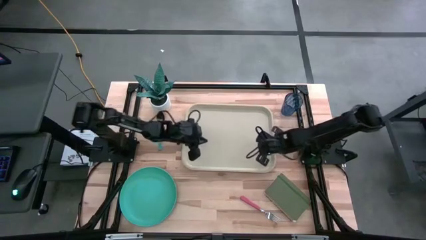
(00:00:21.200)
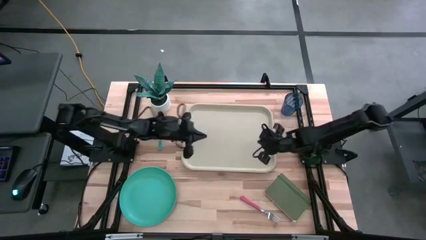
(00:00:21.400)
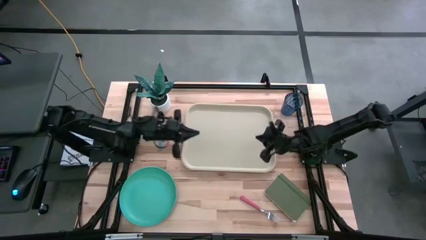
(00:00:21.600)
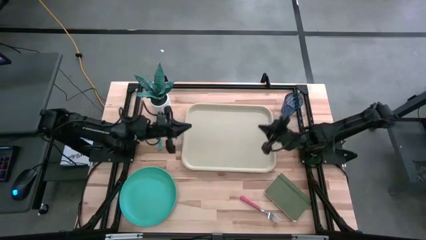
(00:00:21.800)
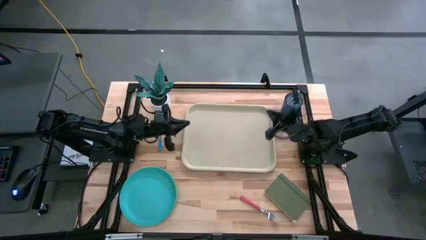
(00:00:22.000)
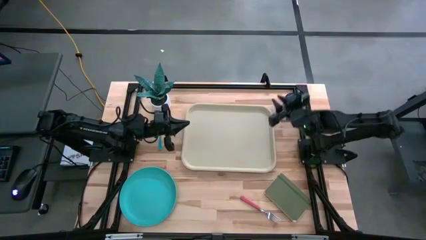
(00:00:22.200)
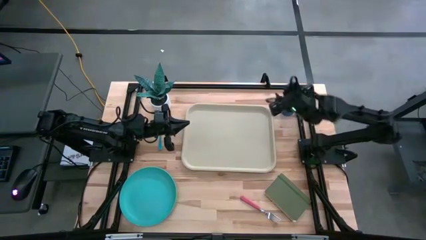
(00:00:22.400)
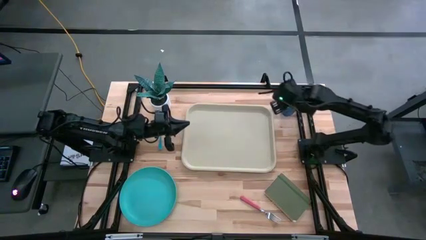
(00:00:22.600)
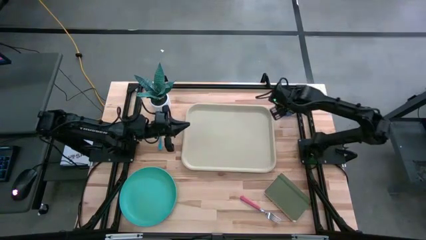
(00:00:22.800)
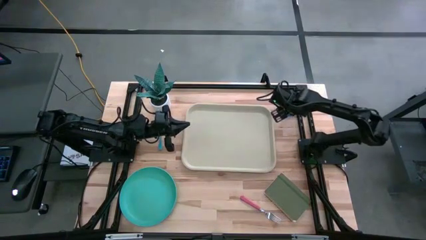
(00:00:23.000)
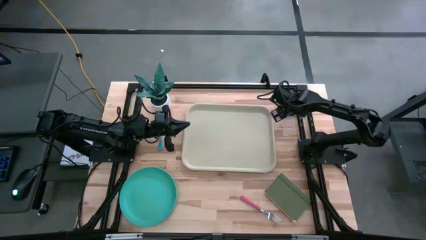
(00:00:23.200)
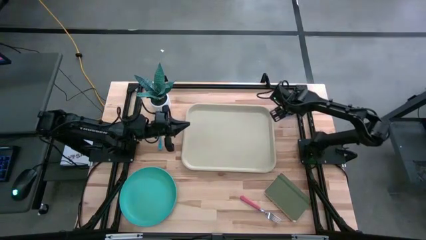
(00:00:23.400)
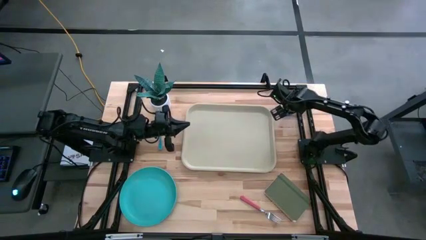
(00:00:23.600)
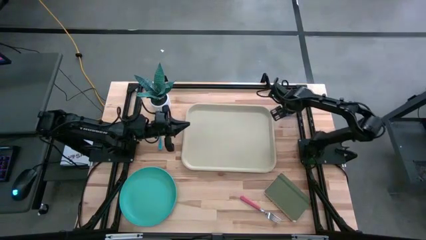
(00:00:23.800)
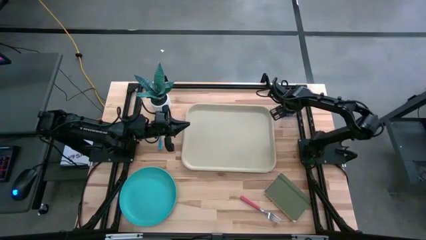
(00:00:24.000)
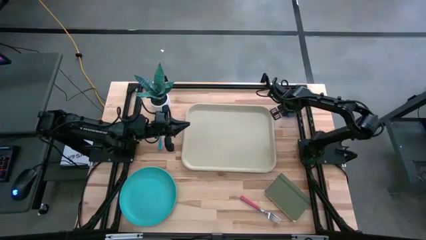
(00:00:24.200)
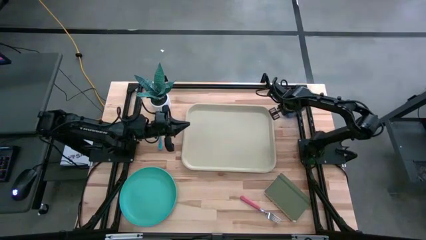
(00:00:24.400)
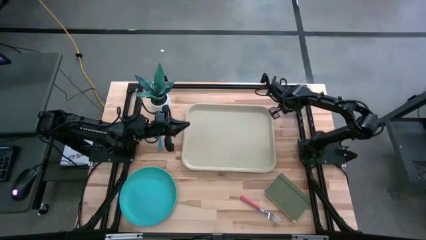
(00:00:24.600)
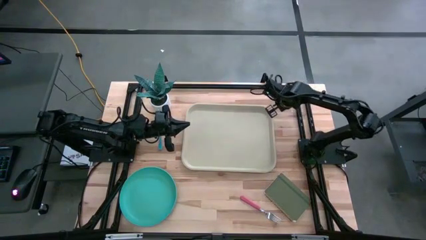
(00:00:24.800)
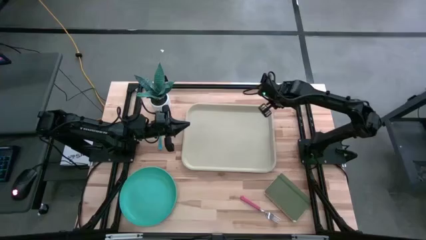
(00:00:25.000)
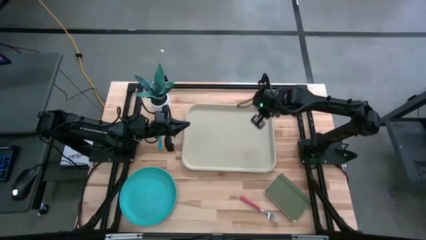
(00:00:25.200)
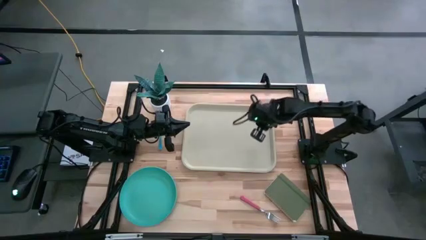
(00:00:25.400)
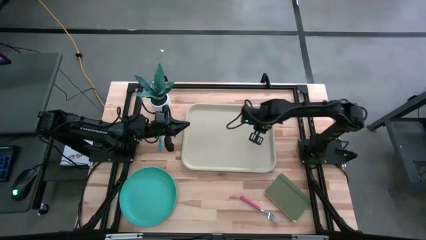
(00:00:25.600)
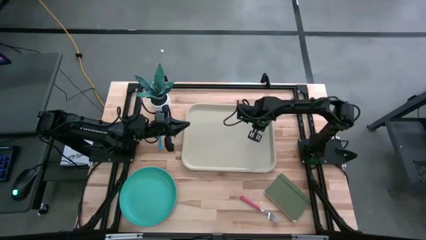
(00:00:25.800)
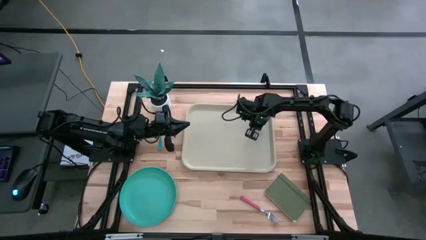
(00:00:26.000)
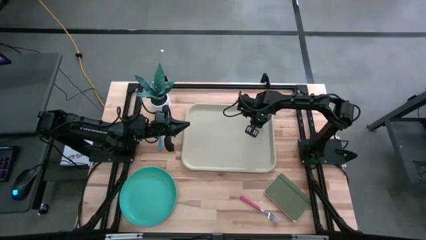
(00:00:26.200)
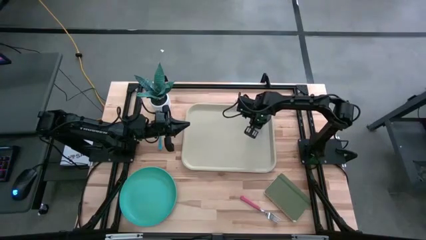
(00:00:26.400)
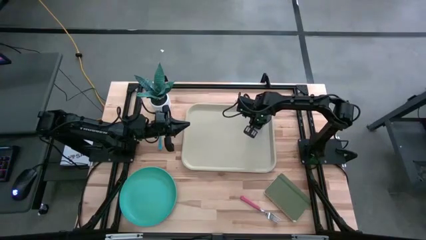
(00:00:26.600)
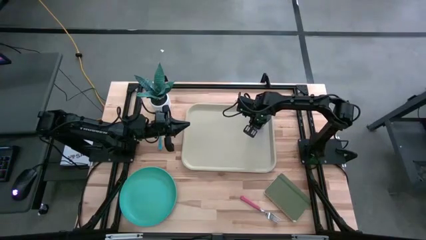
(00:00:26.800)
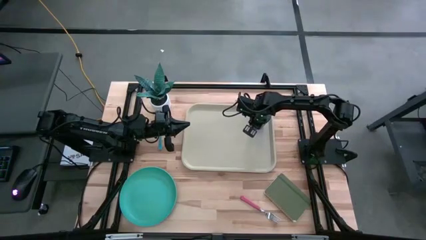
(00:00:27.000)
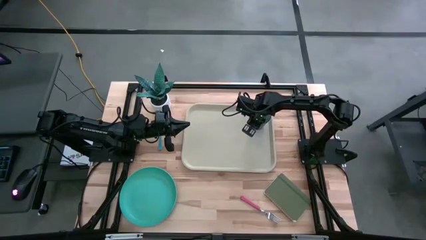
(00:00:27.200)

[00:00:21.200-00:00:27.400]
Task: Pick and place plate/cup/fork/spoon on tray
Put the blue cup to the top right of the light brown serving tray

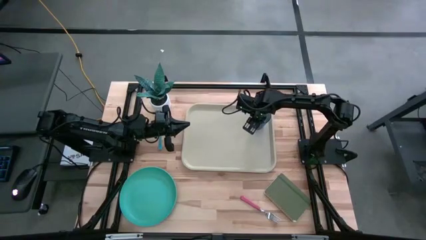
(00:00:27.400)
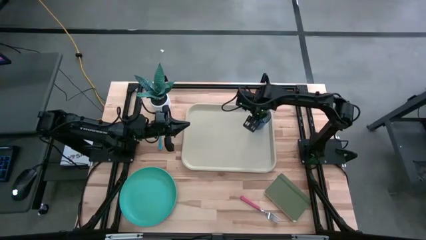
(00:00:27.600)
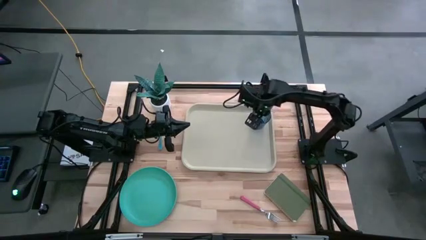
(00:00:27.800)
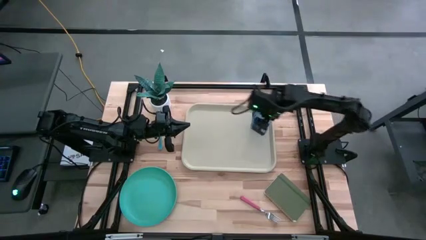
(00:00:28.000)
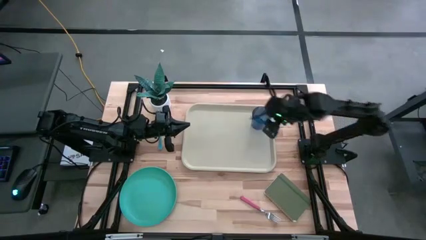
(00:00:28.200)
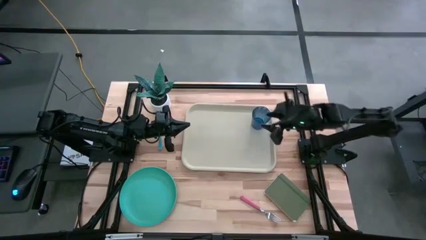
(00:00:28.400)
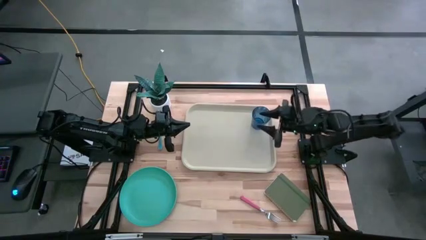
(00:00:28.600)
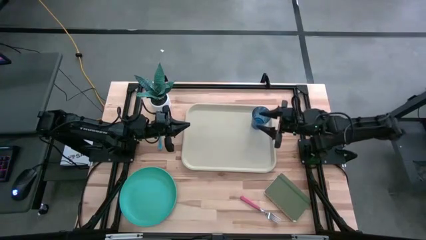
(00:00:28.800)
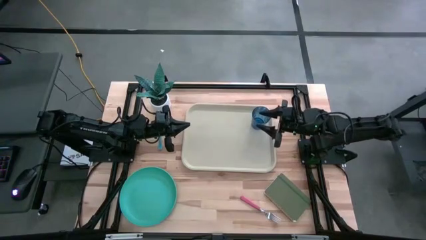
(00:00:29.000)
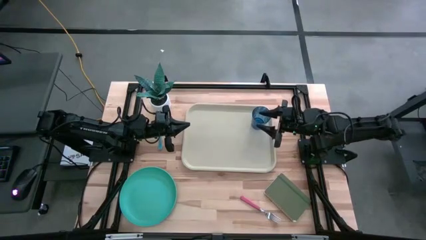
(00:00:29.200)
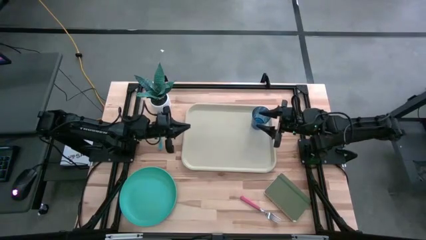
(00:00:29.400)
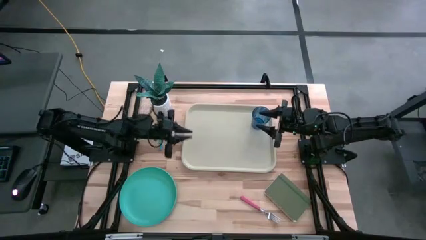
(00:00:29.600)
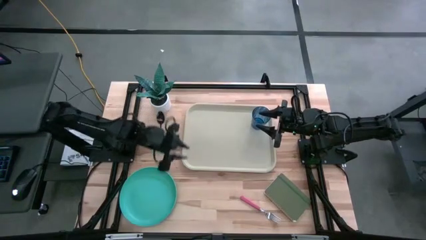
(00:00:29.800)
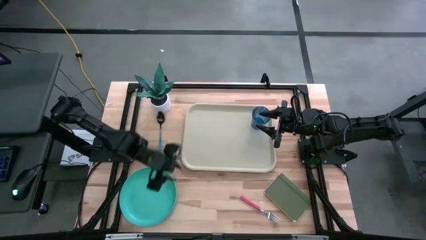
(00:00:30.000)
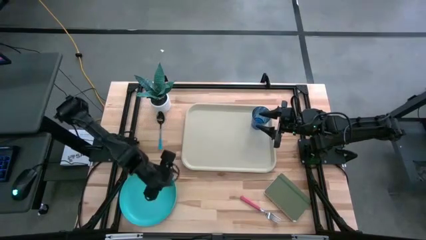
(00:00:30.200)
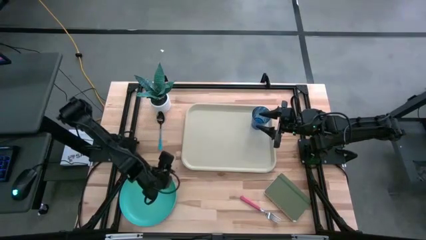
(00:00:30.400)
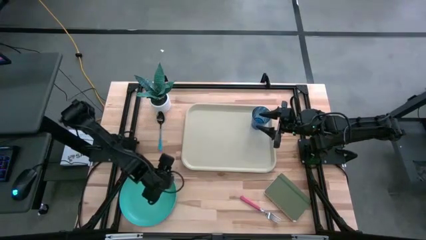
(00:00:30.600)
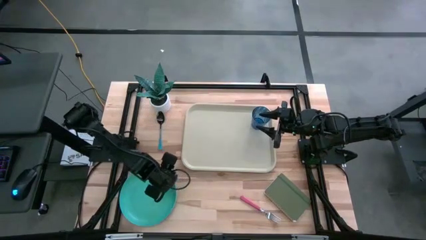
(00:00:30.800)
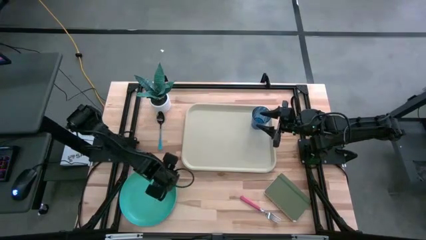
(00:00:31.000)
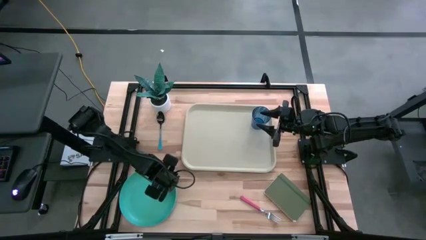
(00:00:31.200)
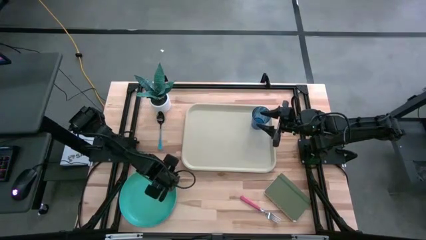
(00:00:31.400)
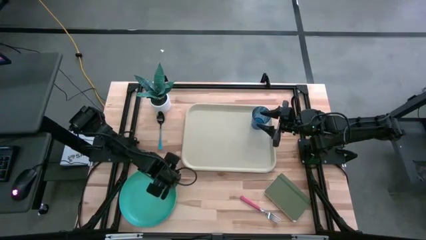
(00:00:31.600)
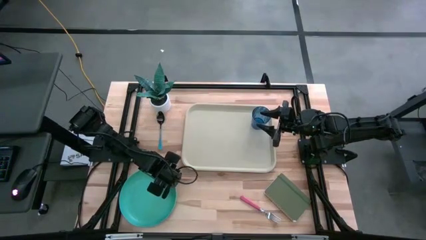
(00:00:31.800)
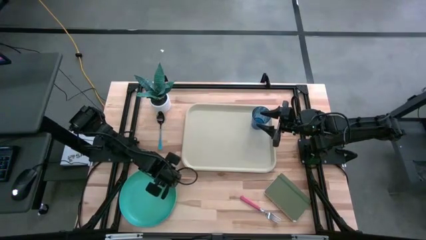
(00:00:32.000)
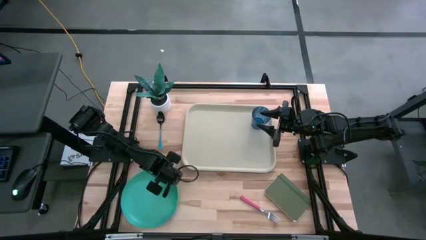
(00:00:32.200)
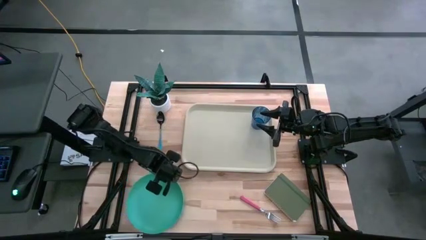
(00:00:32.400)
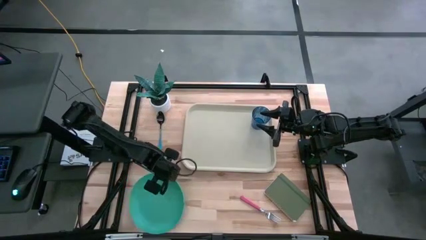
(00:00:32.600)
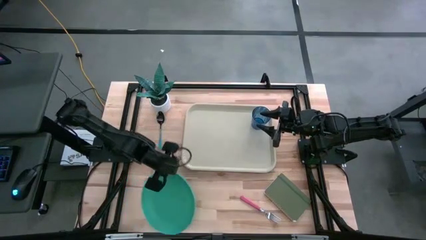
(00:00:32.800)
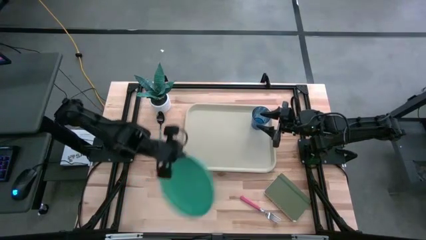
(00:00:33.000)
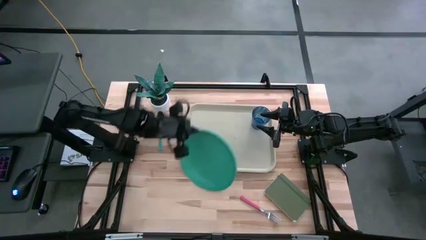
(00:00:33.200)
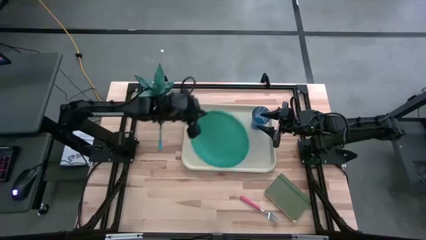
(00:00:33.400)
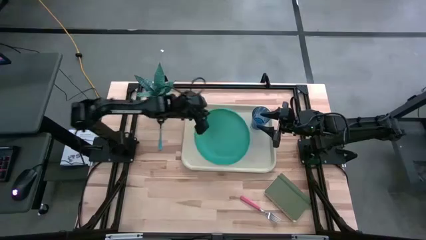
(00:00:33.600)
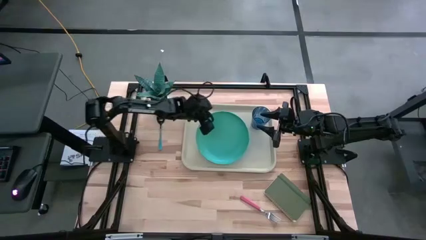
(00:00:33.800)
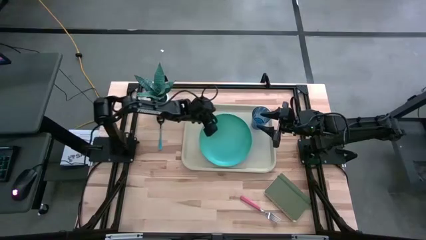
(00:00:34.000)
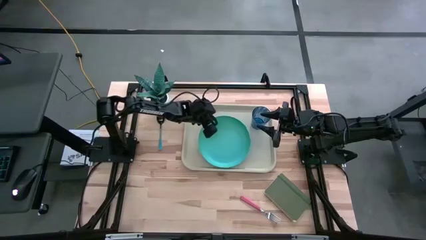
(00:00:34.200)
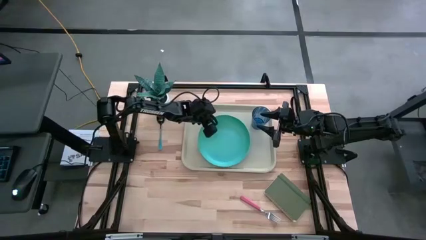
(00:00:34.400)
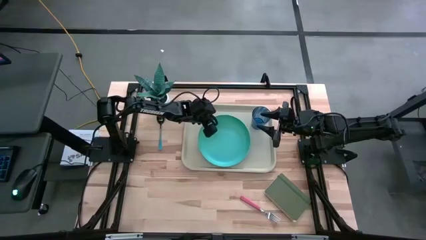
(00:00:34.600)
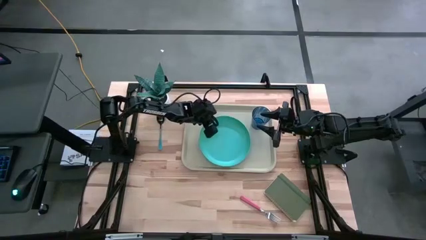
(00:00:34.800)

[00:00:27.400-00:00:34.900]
Put the light blue plate to the center of the light brown serving tray
